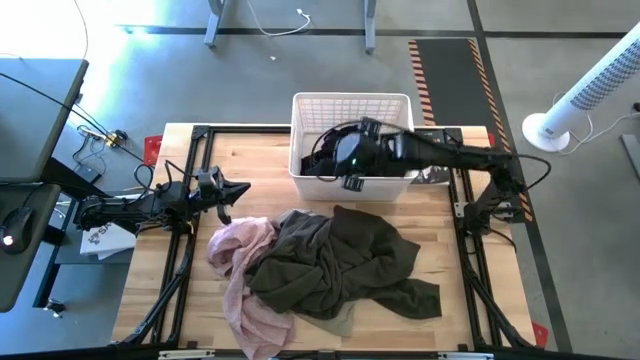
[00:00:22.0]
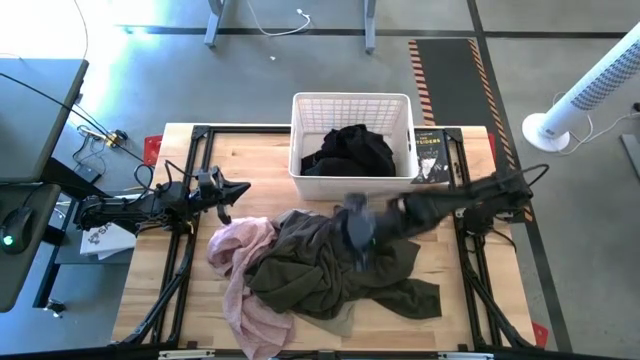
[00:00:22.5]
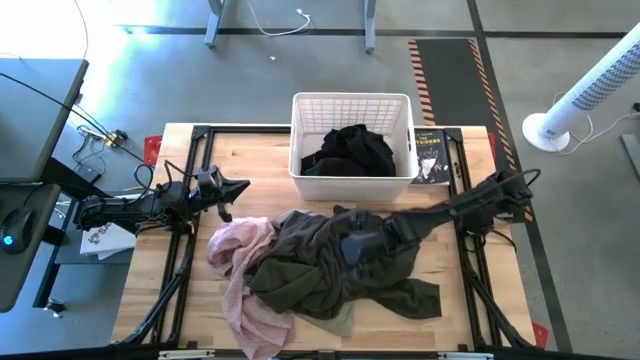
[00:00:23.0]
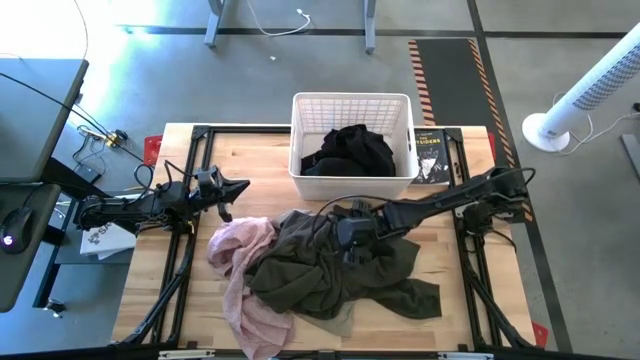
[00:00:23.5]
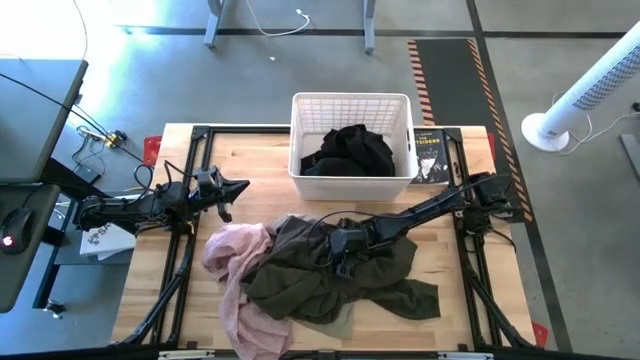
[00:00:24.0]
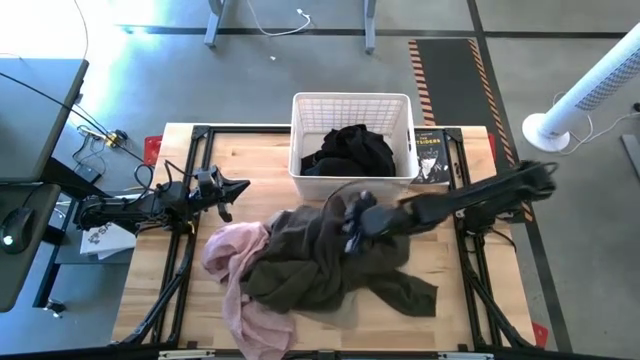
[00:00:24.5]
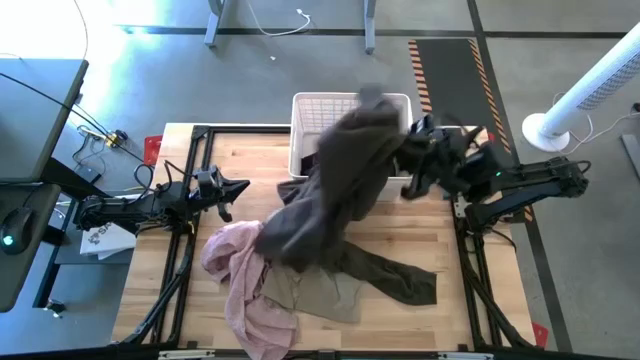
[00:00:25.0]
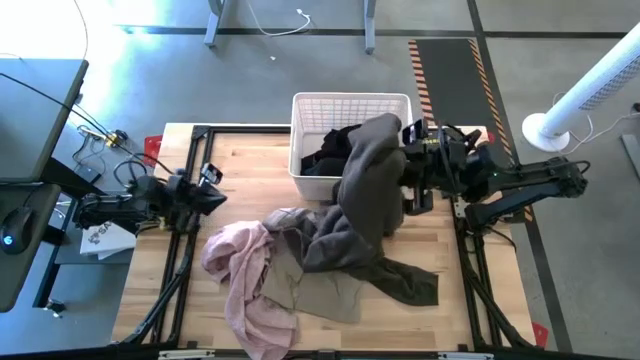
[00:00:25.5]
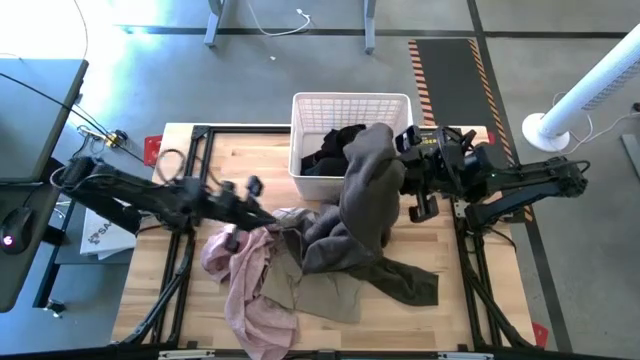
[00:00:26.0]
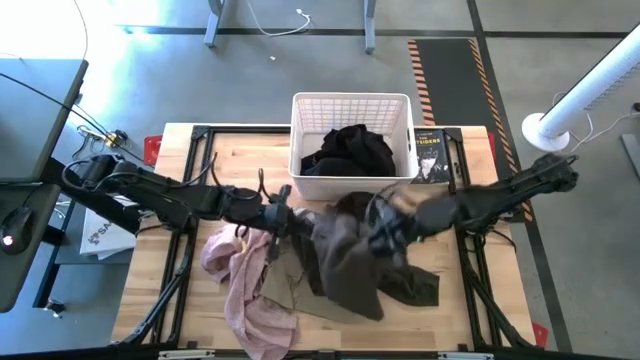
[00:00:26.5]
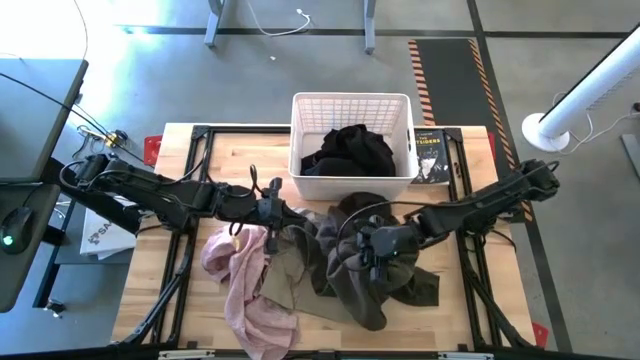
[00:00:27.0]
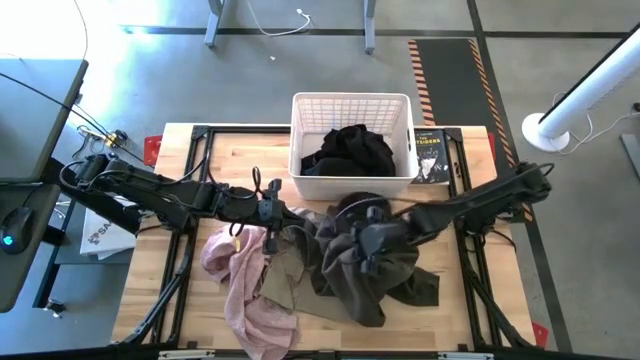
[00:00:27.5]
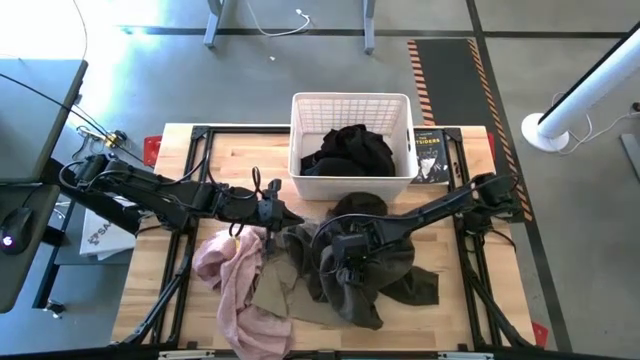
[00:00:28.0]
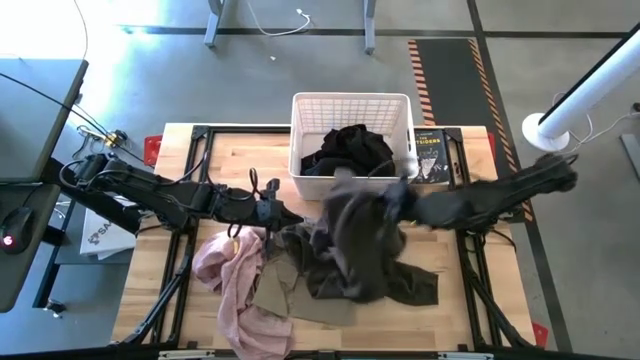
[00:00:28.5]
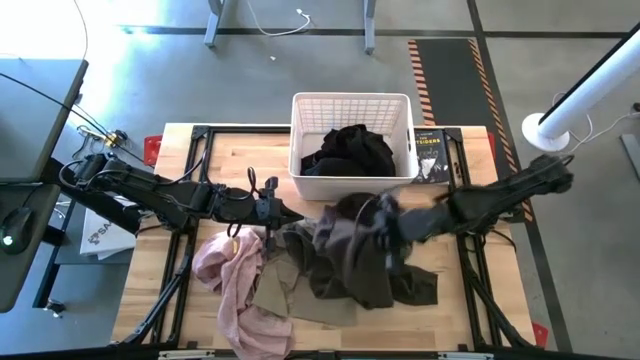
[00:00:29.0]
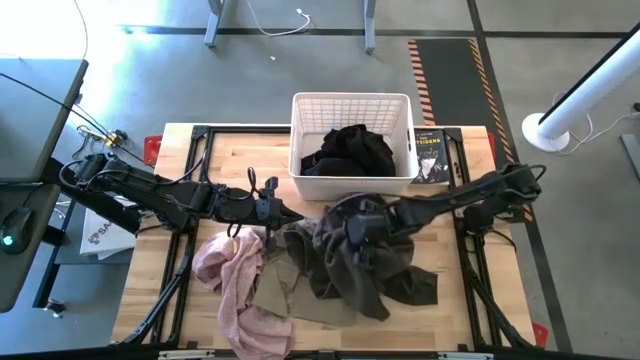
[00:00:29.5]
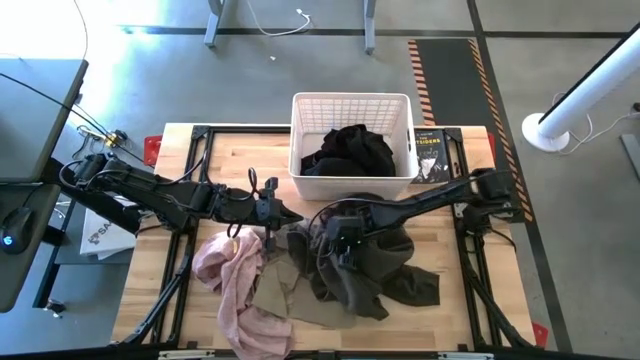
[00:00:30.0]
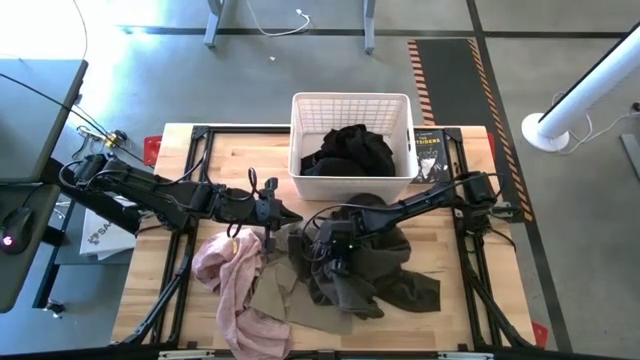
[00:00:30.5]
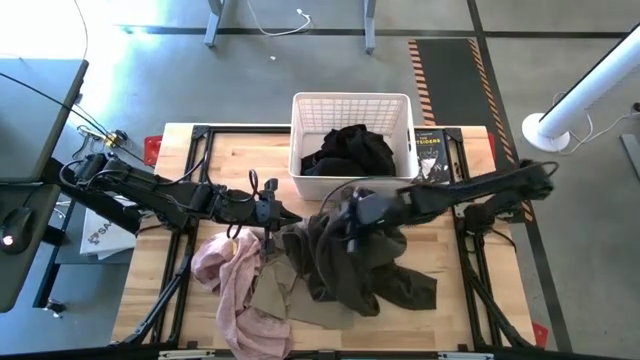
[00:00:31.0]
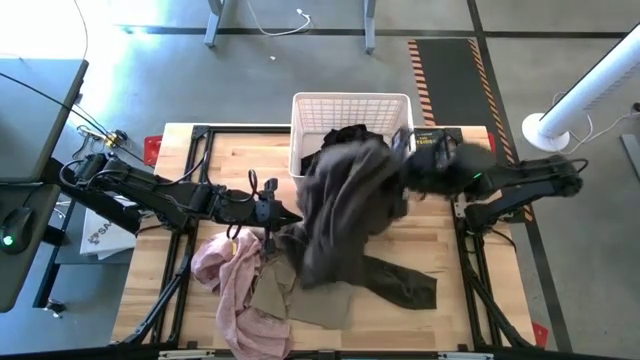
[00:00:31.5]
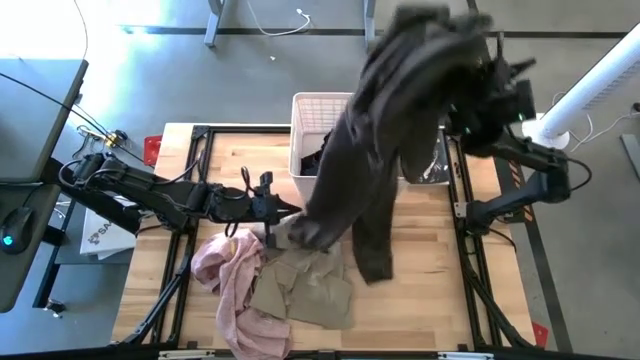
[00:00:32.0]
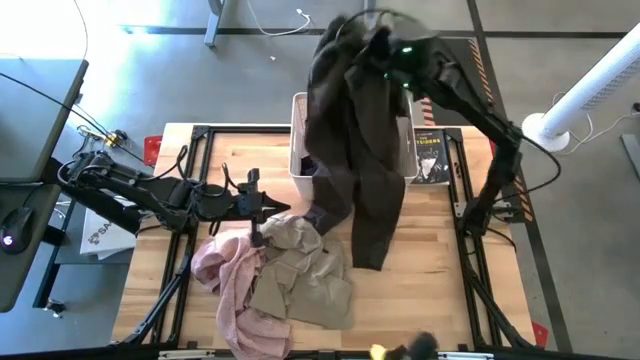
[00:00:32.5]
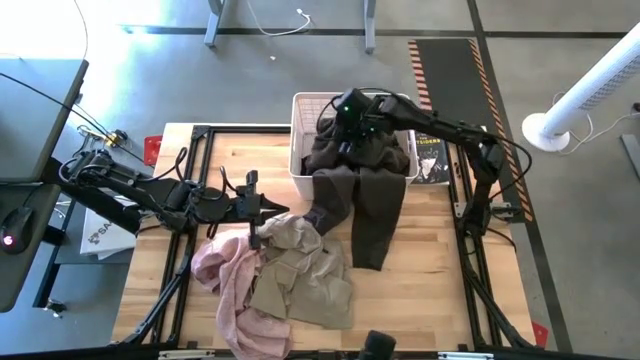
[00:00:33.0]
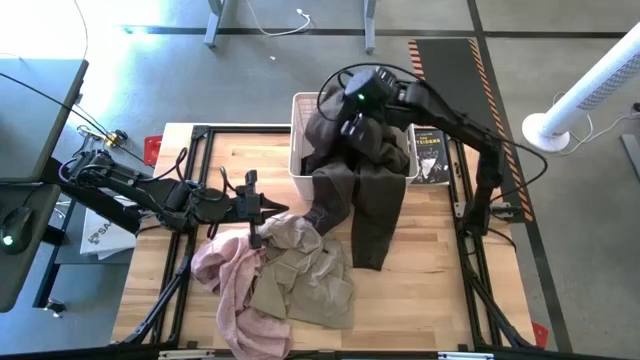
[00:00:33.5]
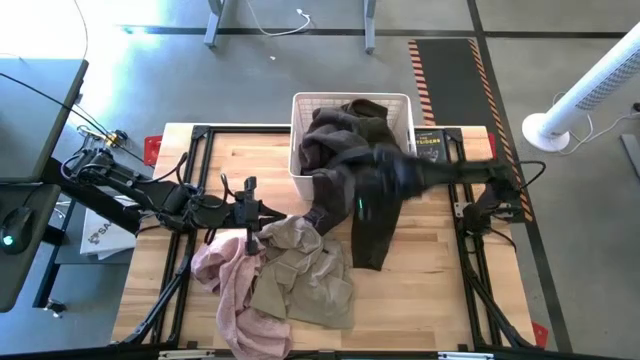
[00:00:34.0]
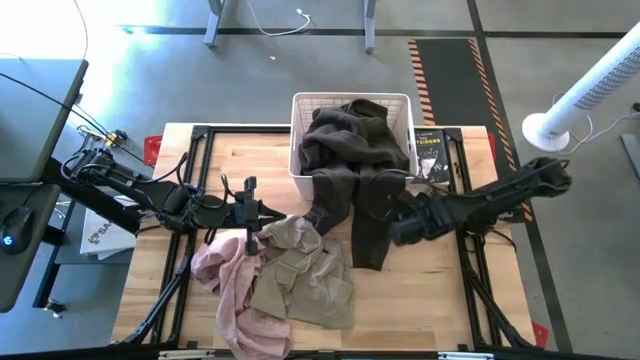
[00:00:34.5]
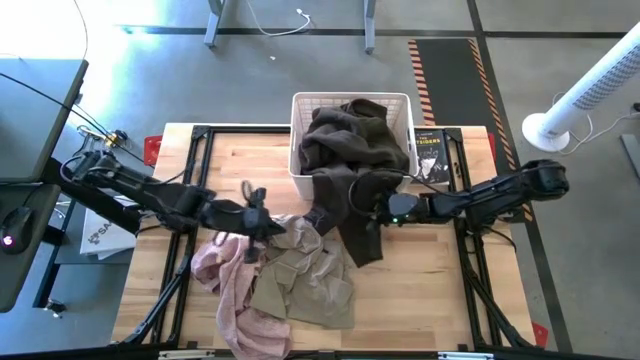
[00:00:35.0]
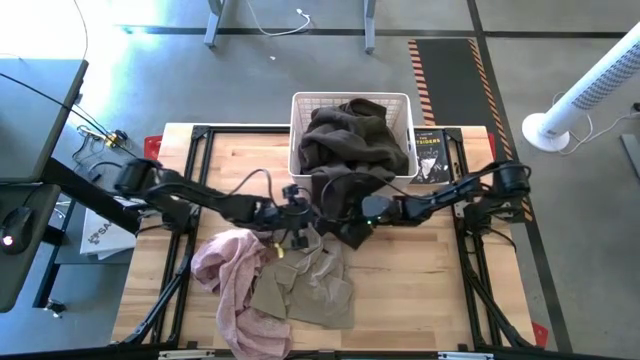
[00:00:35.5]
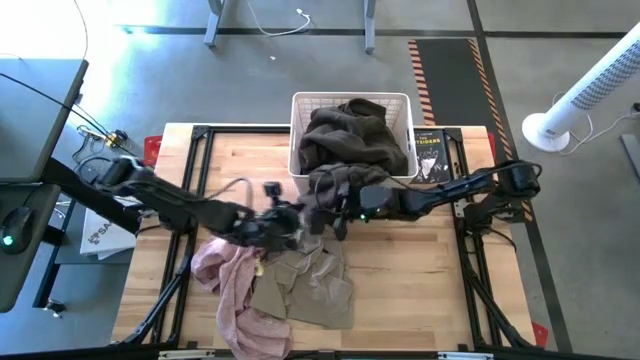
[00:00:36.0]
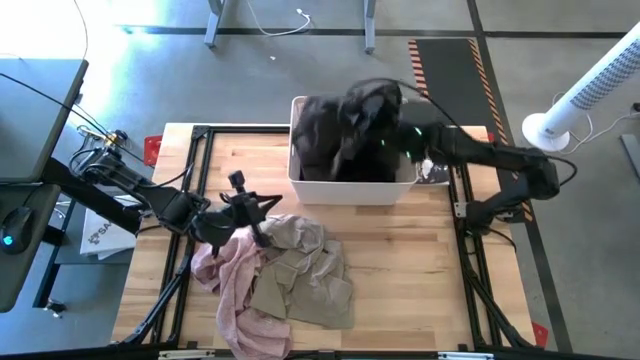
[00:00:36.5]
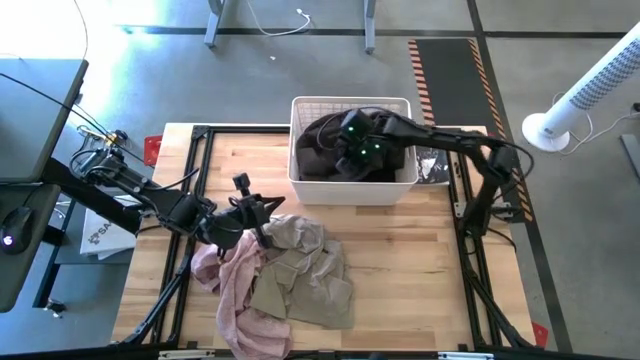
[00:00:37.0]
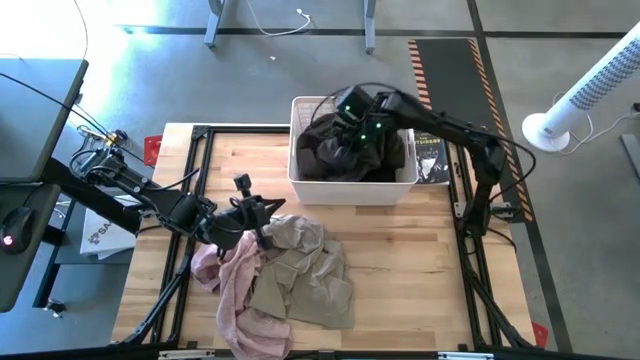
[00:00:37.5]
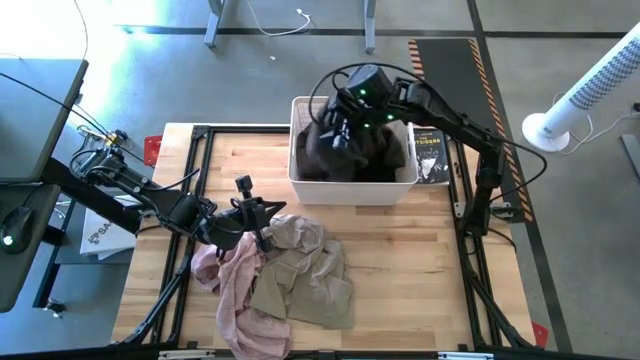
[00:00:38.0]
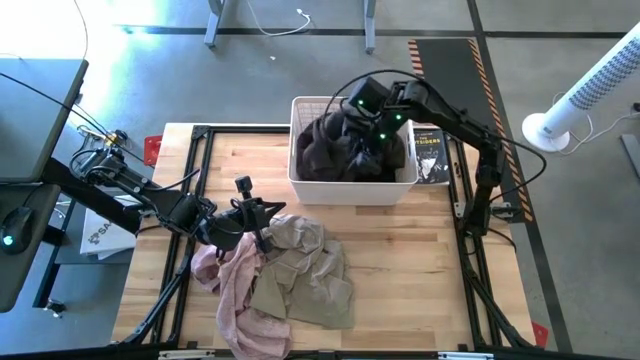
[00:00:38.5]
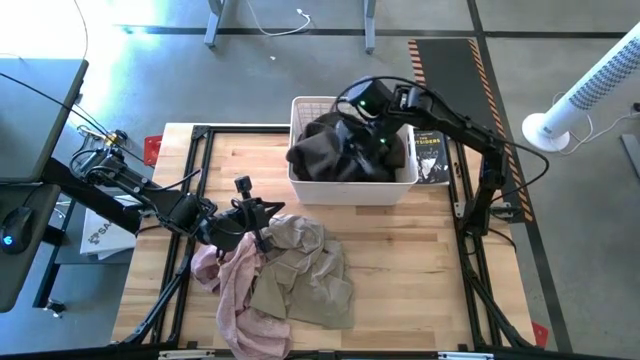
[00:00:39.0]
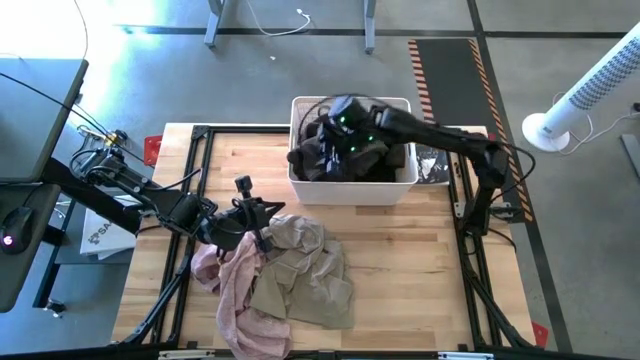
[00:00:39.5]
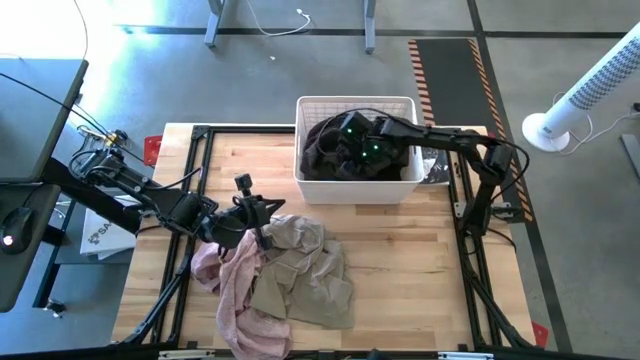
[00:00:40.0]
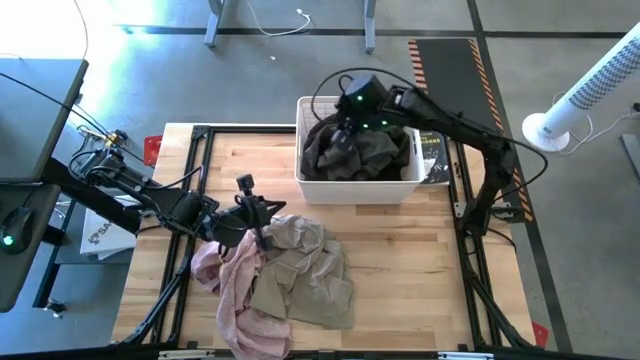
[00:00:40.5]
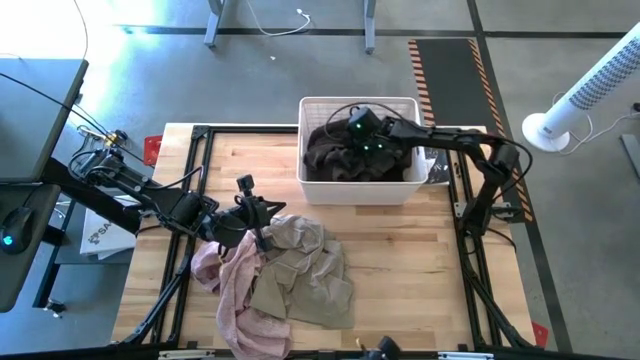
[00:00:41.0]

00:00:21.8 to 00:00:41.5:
Task: Sort clothes
Put the gray pants into the laundry bin
